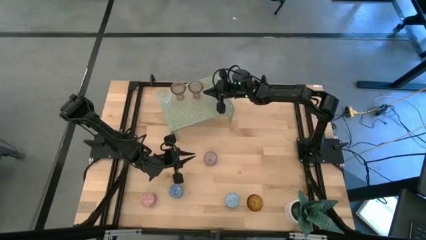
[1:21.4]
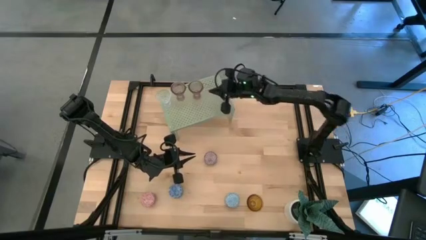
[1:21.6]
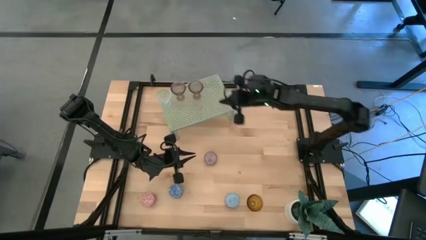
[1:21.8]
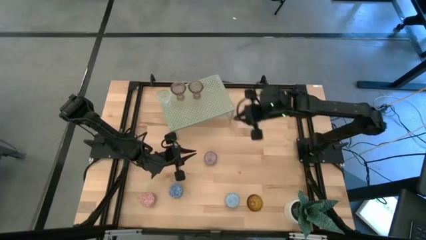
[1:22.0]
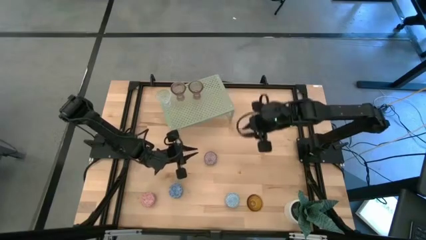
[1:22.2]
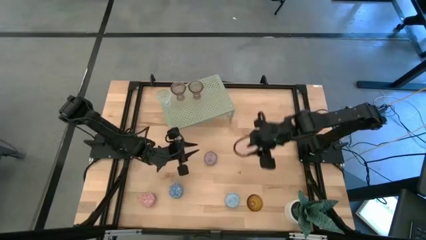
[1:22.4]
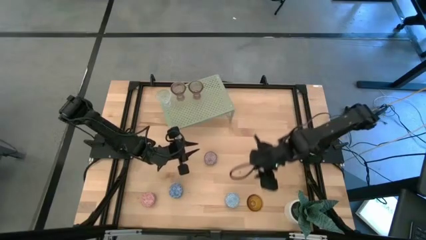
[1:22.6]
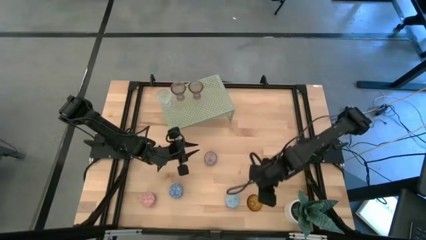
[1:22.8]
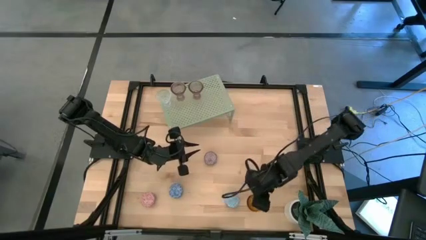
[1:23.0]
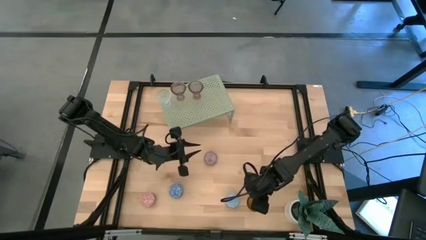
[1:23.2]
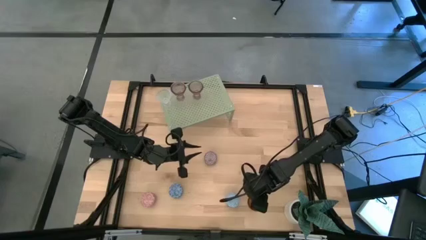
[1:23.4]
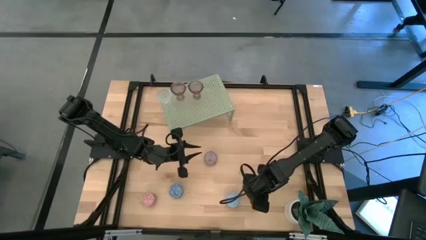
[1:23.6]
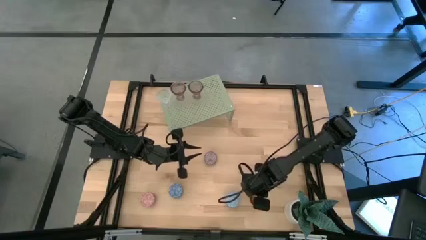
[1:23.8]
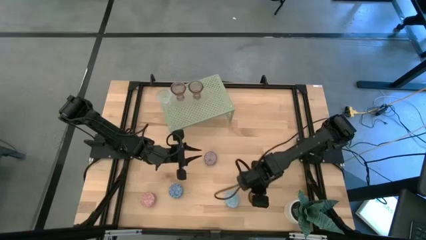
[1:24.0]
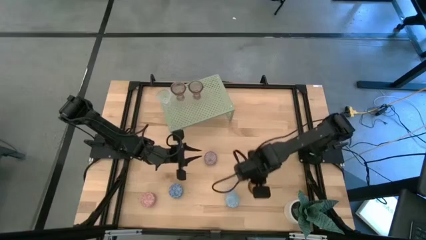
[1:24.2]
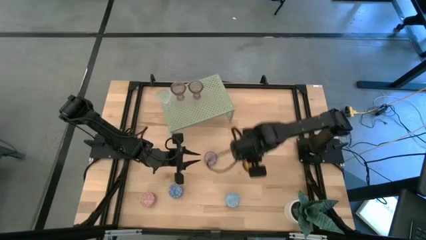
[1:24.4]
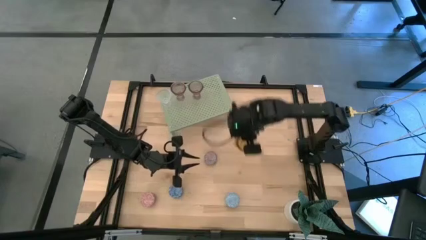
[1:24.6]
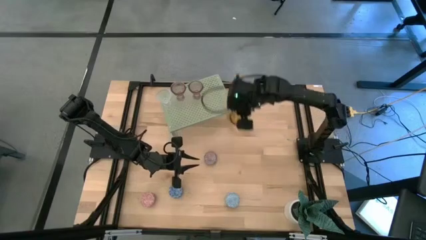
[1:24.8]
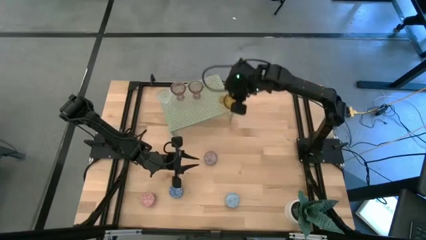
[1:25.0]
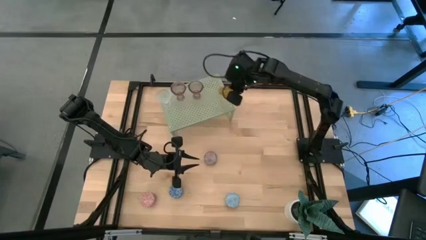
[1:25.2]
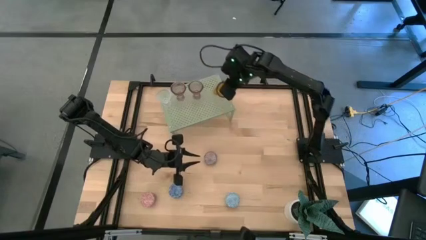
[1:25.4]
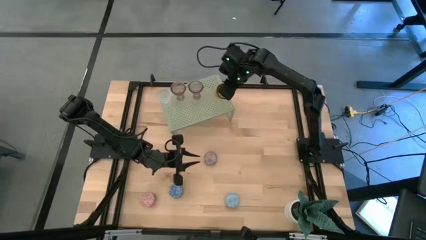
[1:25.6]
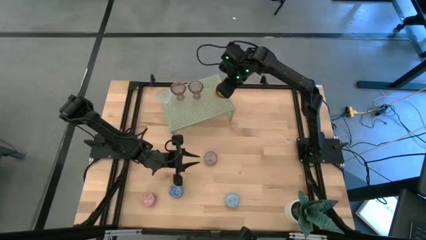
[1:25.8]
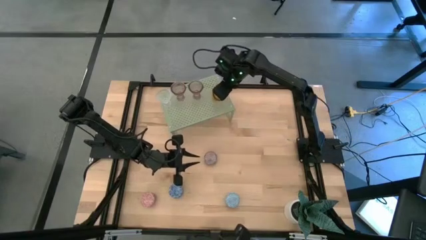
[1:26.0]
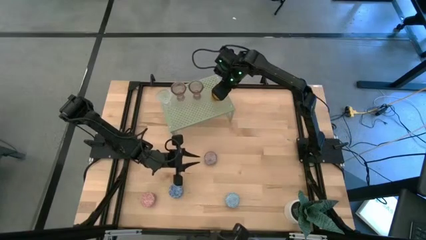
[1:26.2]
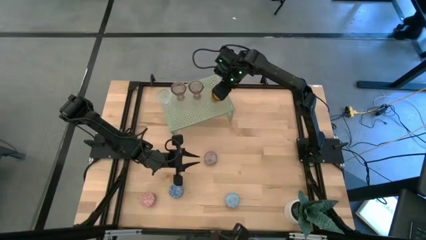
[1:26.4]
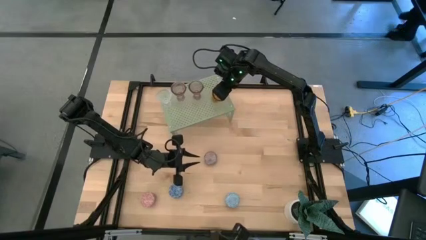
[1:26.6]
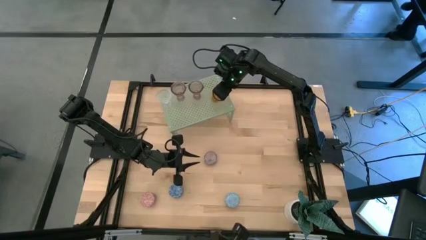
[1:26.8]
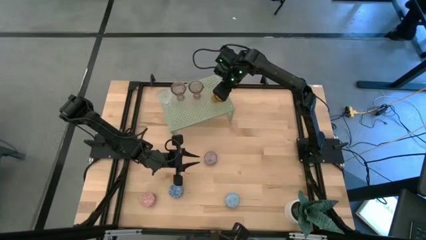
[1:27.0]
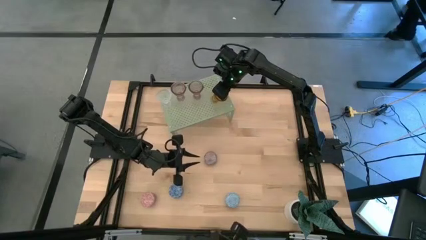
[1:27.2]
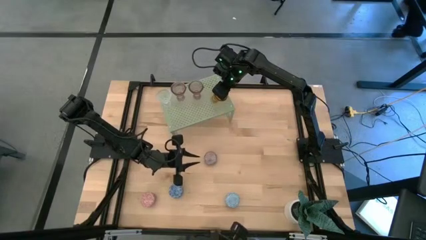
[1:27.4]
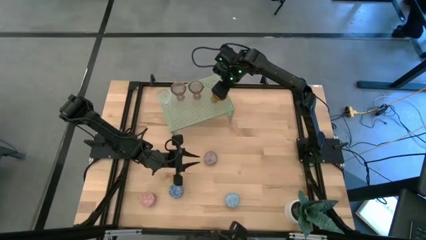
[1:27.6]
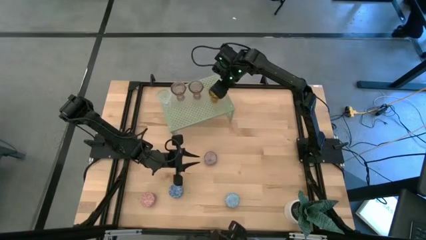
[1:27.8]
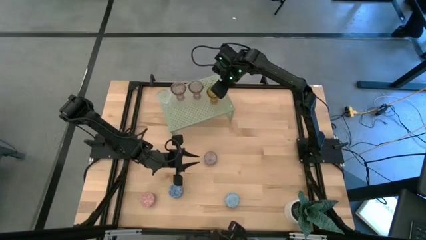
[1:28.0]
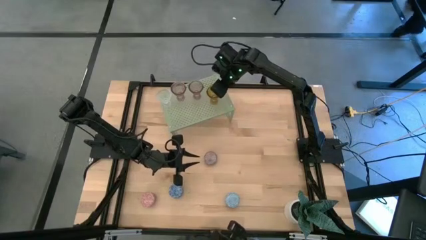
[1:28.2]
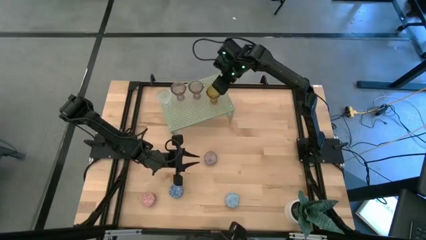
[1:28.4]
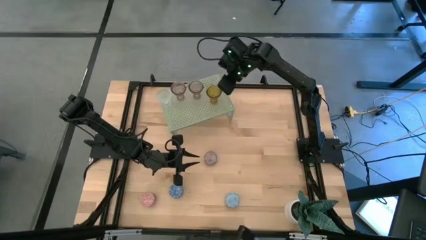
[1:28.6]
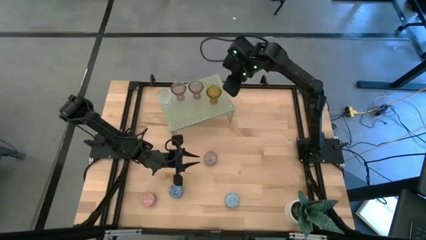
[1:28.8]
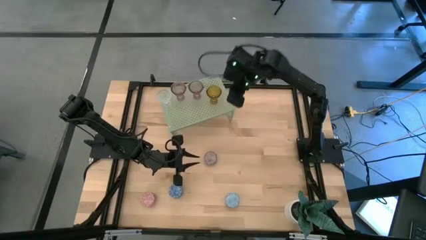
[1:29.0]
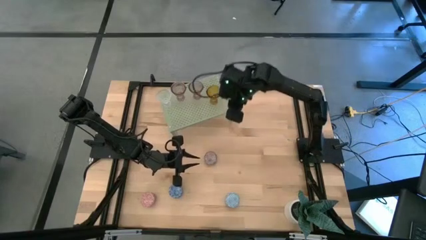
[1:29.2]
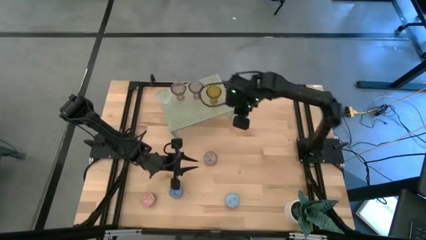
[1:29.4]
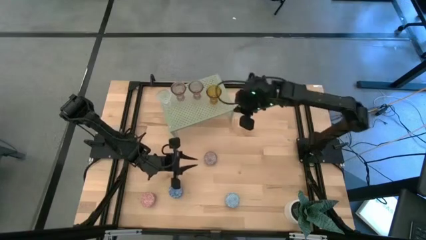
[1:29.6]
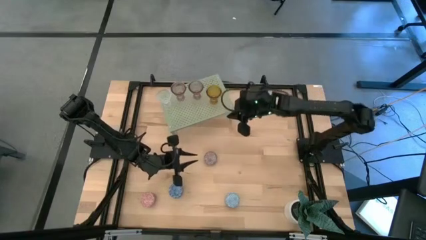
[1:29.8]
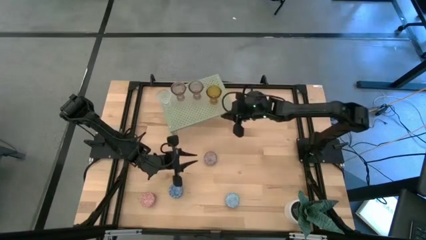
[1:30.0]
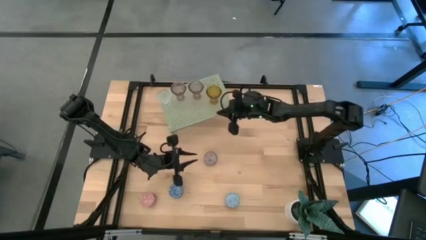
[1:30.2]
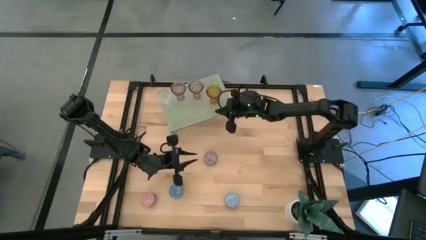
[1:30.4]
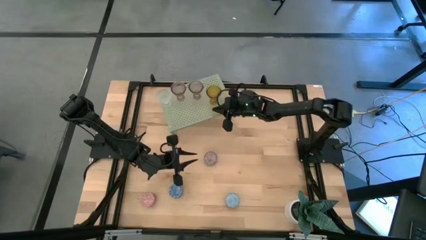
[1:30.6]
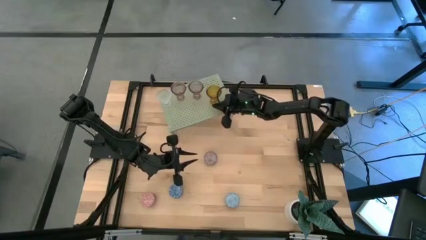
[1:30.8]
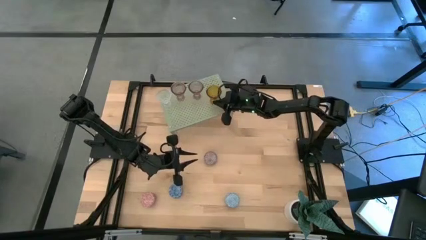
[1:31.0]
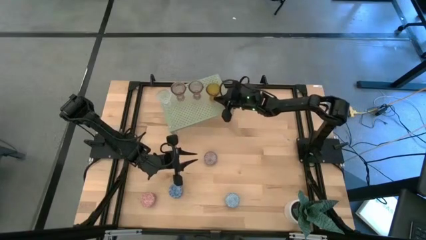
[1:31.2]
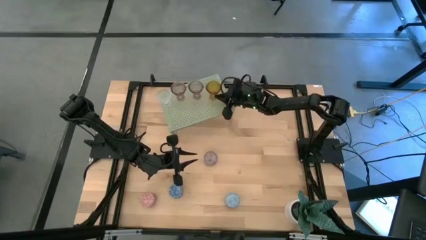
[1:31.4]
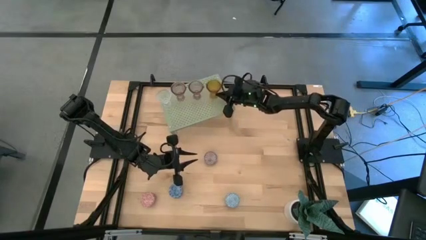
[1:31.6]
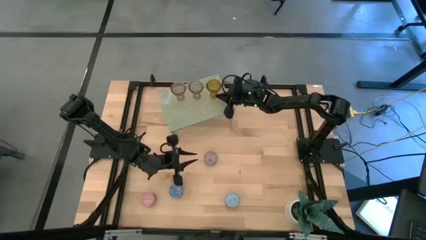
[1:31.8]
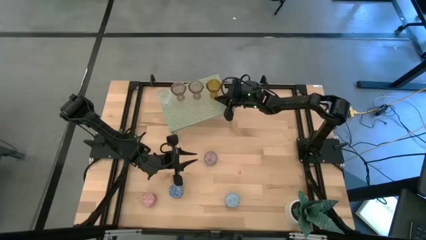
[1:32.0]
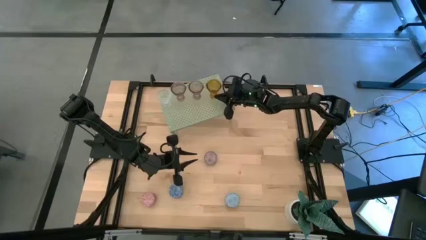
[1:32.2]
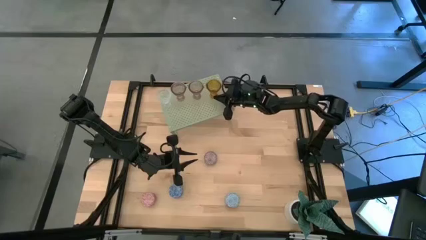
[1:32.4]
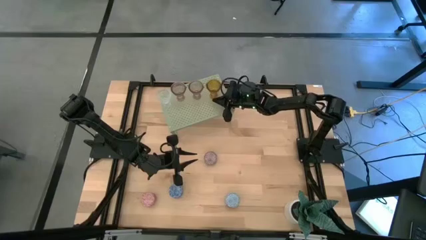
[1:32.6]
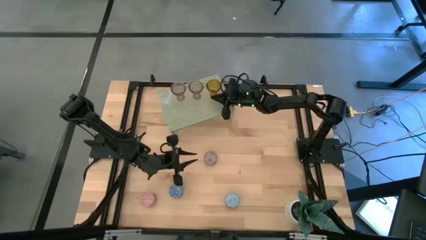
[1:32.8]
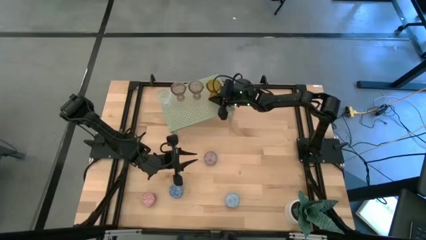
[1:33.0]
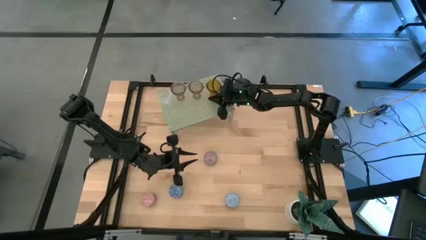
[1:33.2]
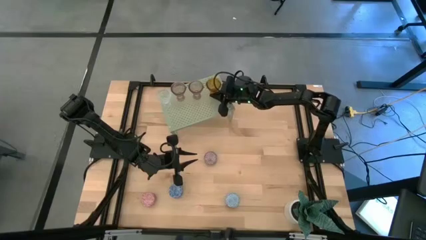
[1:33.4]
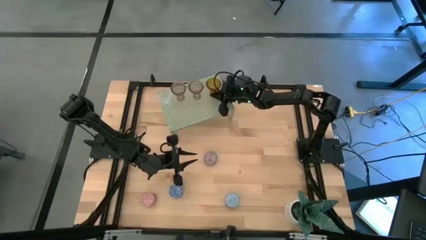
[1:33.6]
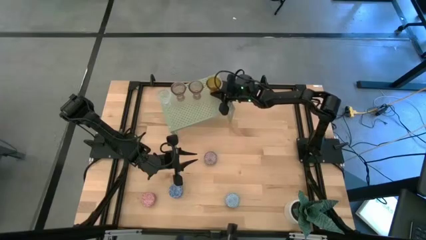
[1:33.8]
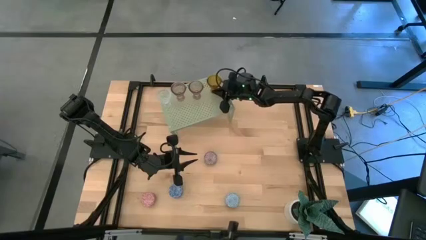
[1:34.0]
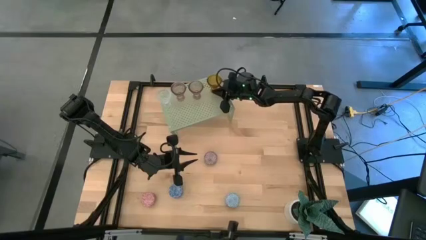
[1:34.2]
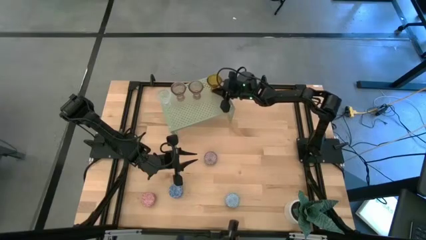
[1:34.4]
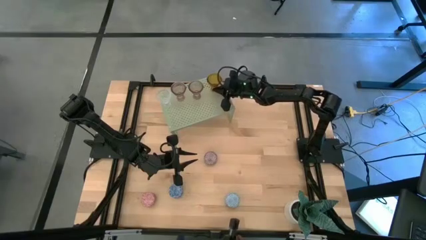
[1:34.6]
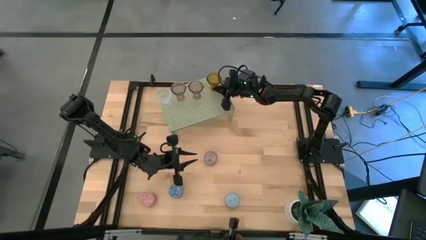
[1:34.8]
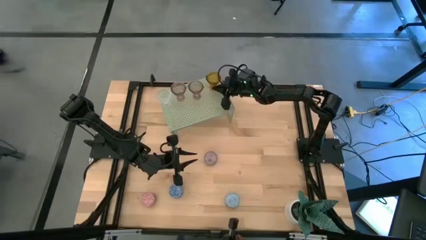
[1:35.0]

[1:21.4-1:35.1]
Task: Pick & Place candle stick holders
Put the yellow glass candle holder on the shelf aligned with the other glass candle holders

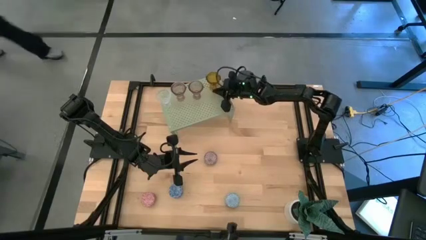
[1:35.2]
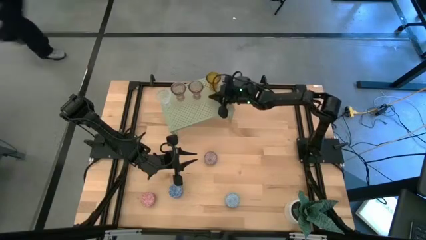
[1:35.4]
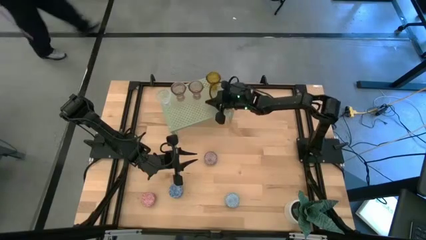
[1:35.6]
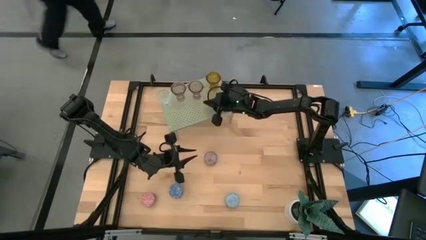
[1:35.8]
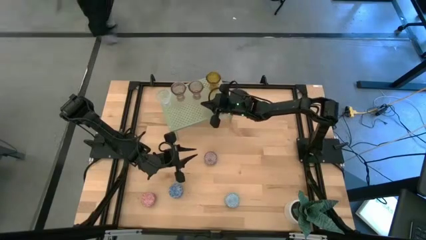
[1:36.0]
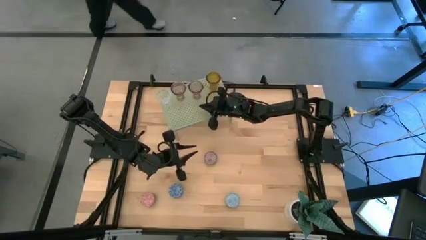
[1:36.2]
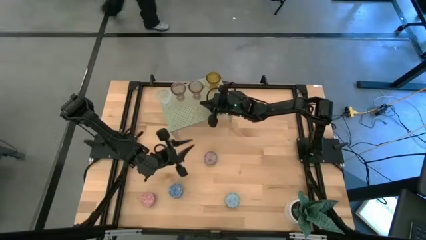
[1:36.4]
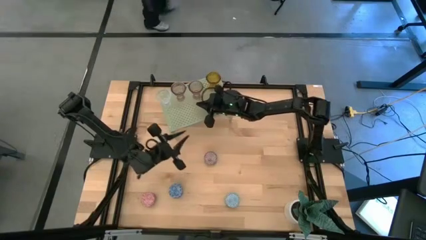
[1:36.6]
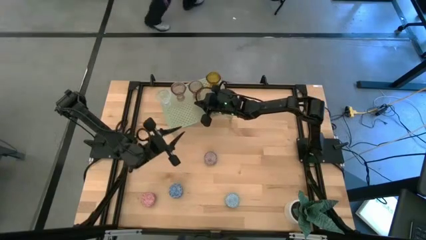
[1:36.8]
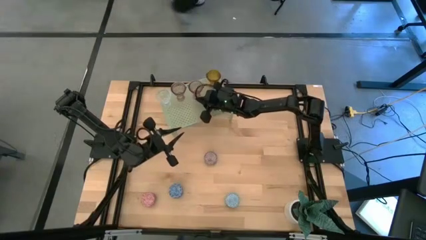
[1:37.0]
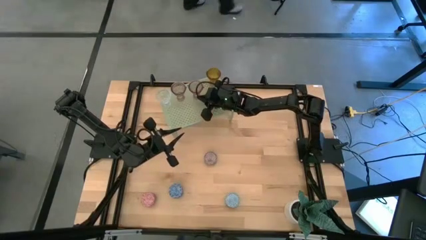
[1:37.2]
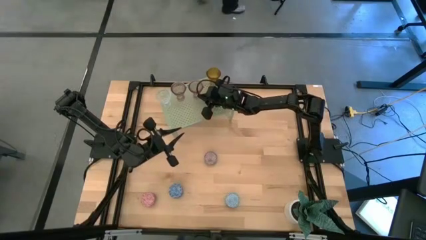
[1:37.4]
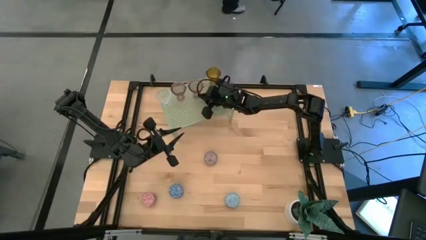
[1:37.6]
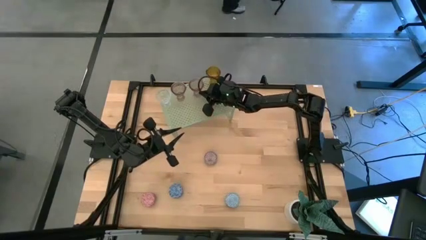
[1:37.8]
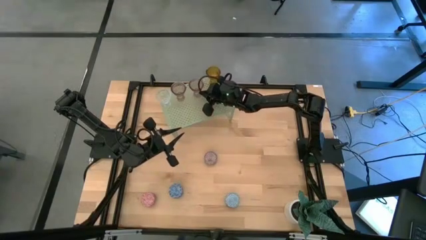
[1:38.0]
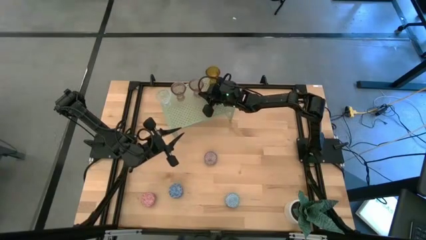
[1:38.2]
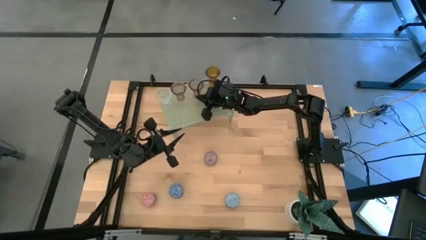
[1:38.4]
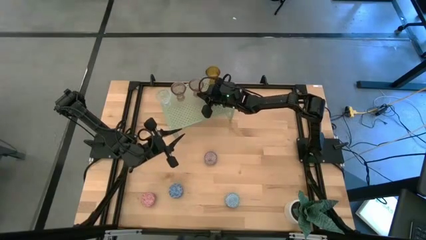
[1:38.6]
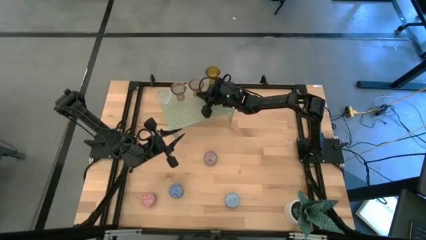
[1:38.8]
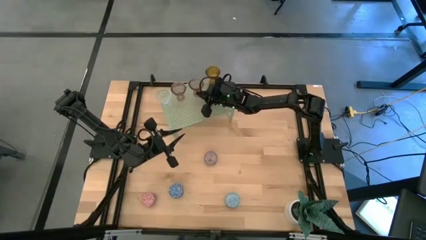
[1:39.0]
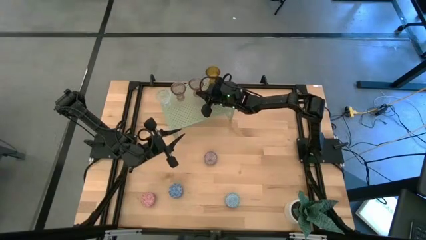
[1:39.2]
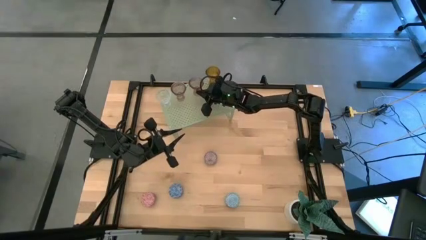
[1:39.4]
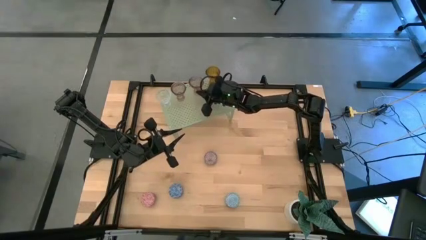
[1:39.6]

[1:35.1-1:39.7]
Adjust the right pink candle holder on the shelf
